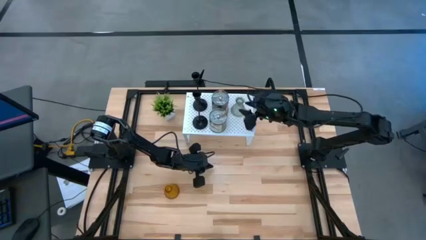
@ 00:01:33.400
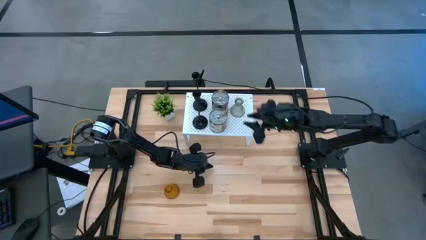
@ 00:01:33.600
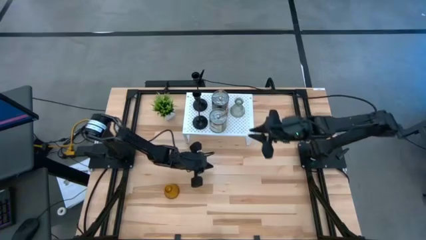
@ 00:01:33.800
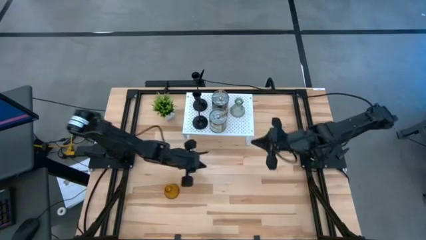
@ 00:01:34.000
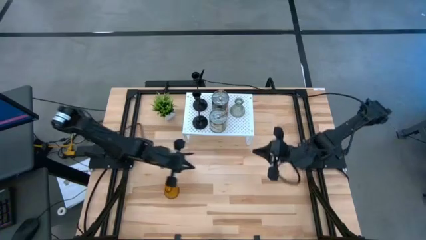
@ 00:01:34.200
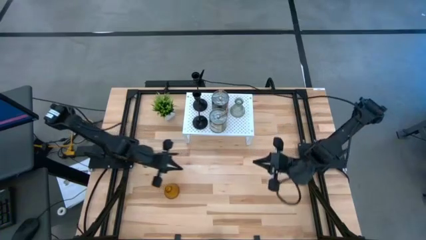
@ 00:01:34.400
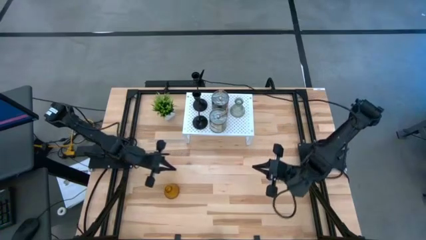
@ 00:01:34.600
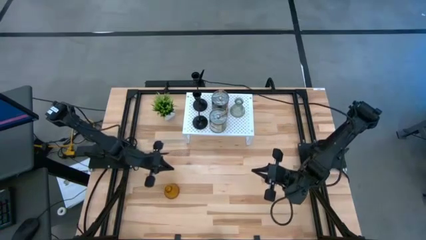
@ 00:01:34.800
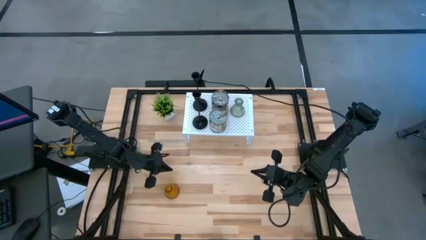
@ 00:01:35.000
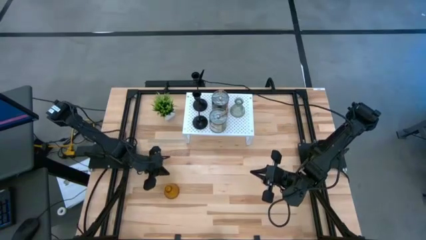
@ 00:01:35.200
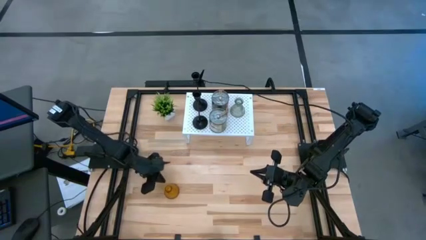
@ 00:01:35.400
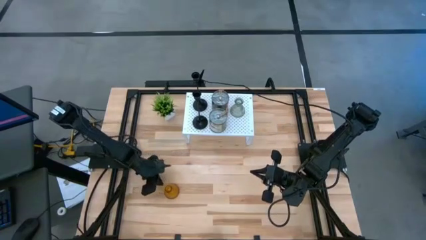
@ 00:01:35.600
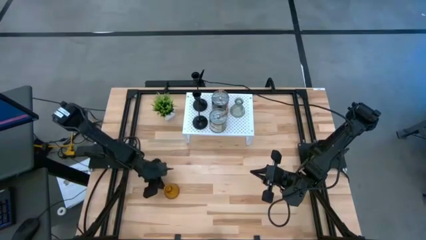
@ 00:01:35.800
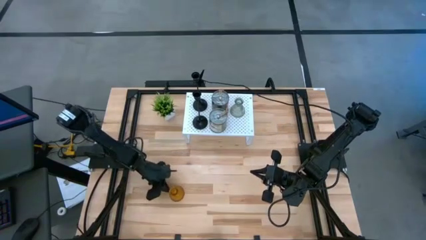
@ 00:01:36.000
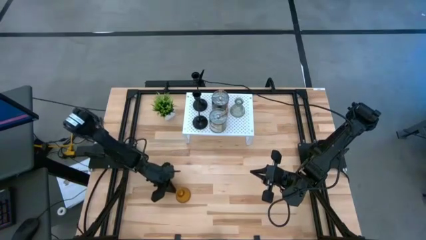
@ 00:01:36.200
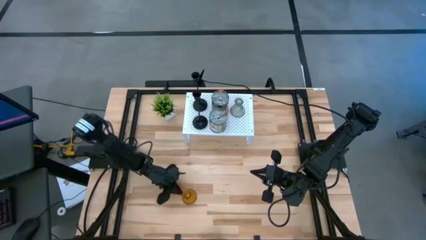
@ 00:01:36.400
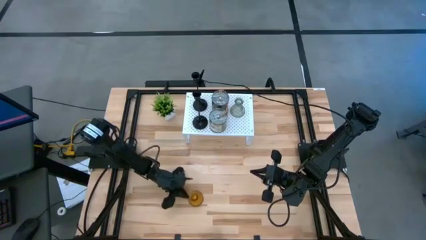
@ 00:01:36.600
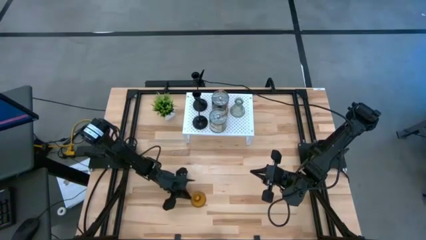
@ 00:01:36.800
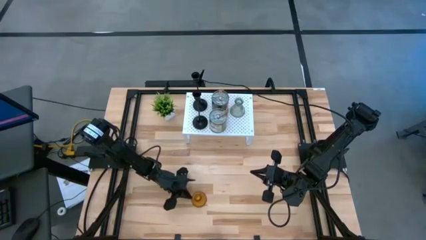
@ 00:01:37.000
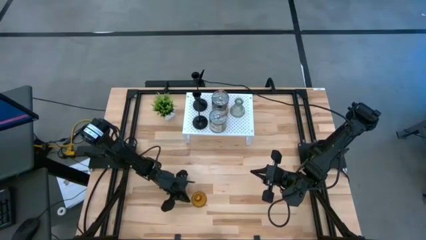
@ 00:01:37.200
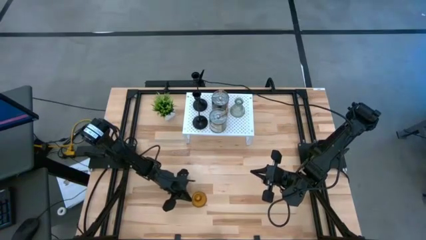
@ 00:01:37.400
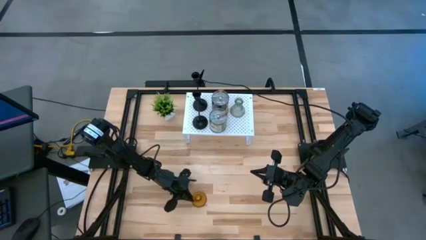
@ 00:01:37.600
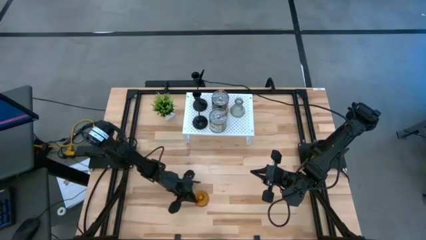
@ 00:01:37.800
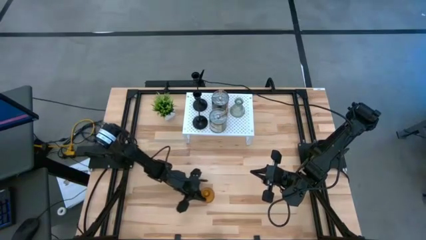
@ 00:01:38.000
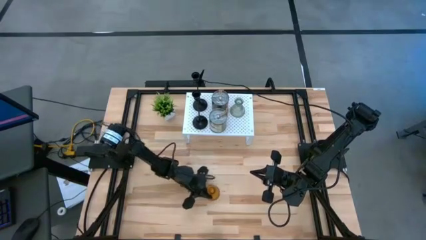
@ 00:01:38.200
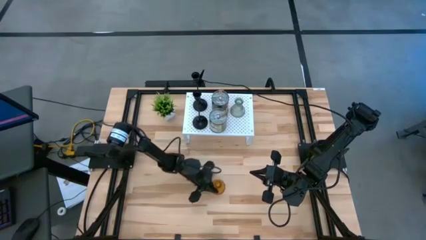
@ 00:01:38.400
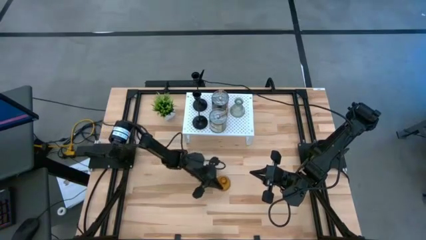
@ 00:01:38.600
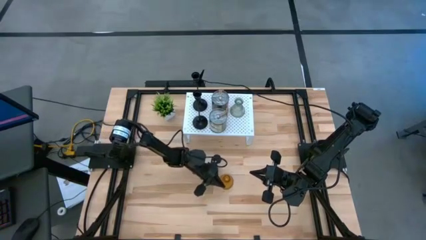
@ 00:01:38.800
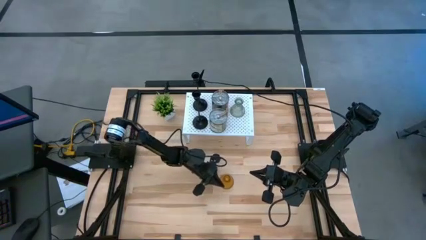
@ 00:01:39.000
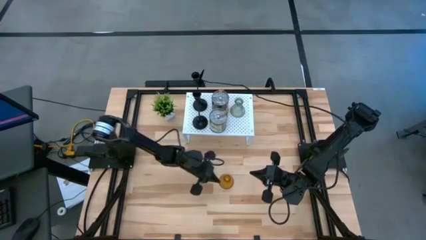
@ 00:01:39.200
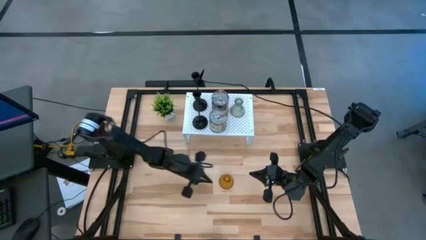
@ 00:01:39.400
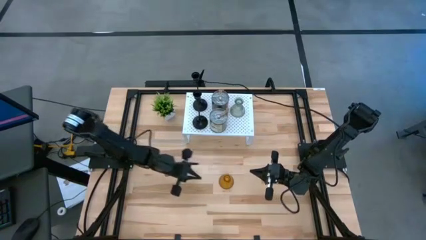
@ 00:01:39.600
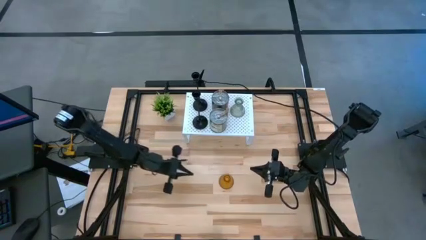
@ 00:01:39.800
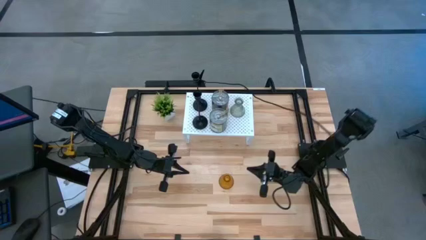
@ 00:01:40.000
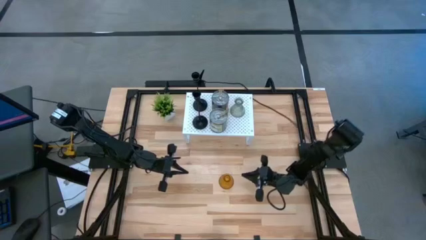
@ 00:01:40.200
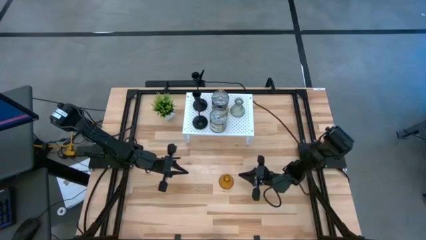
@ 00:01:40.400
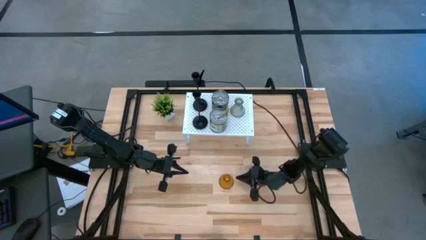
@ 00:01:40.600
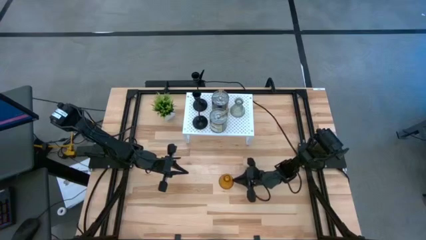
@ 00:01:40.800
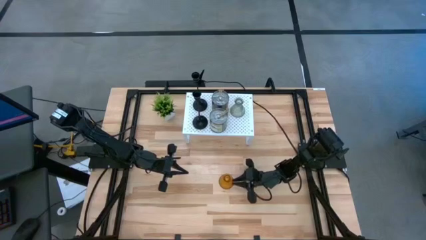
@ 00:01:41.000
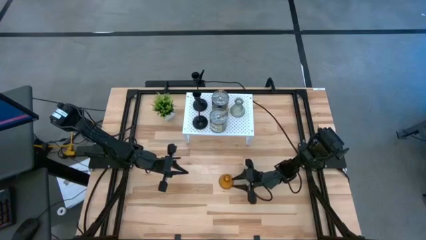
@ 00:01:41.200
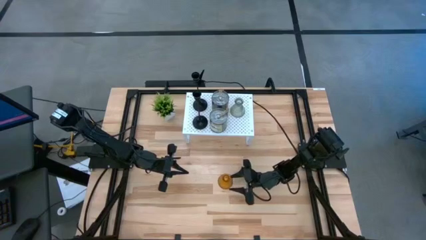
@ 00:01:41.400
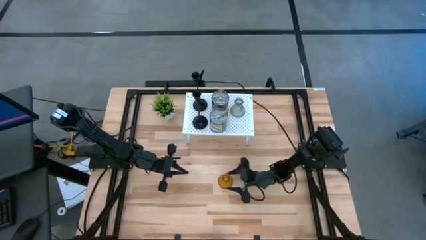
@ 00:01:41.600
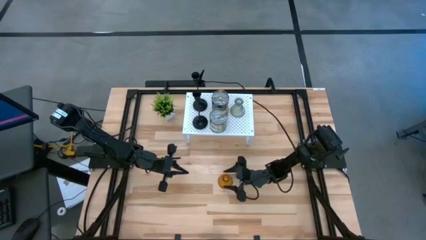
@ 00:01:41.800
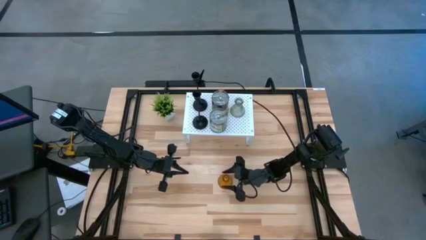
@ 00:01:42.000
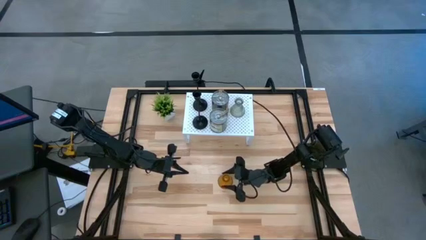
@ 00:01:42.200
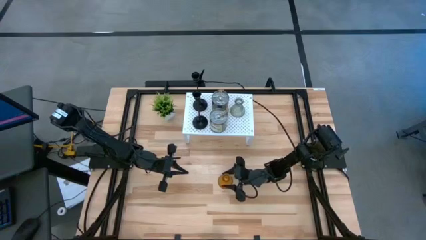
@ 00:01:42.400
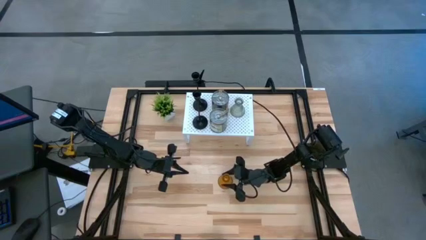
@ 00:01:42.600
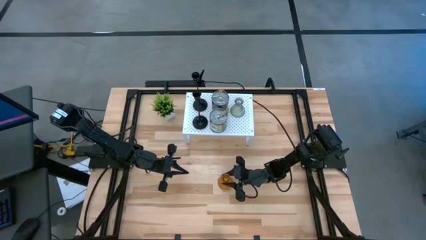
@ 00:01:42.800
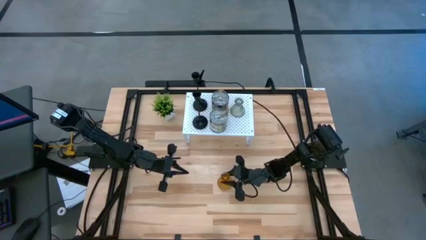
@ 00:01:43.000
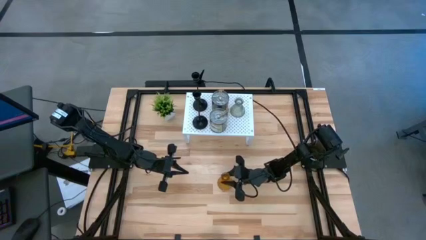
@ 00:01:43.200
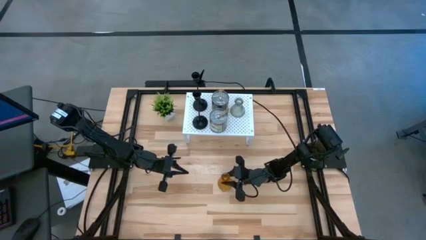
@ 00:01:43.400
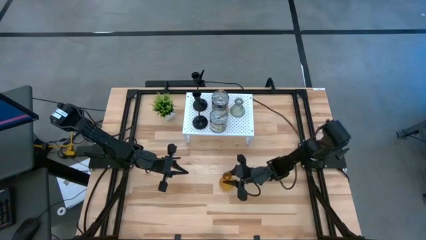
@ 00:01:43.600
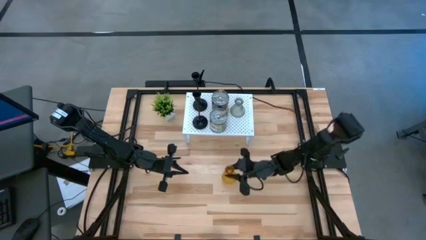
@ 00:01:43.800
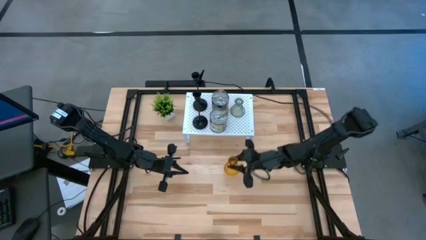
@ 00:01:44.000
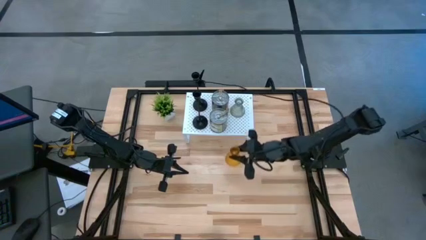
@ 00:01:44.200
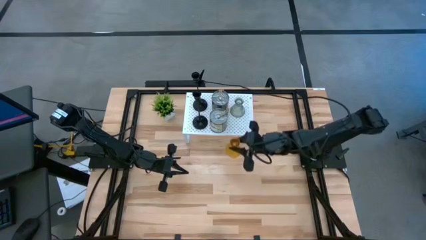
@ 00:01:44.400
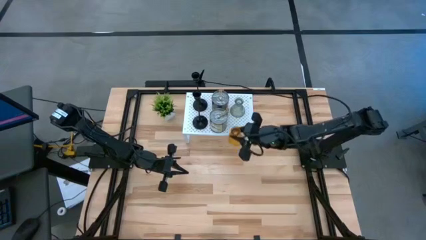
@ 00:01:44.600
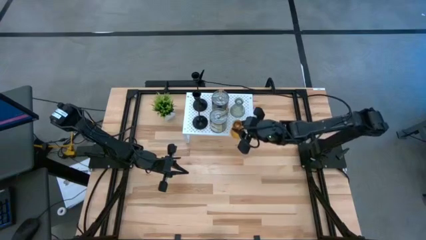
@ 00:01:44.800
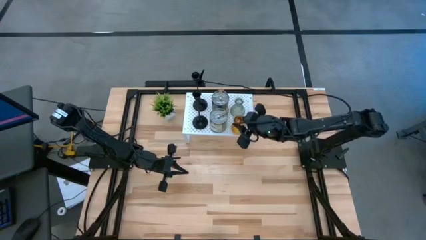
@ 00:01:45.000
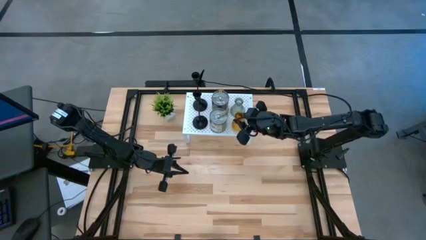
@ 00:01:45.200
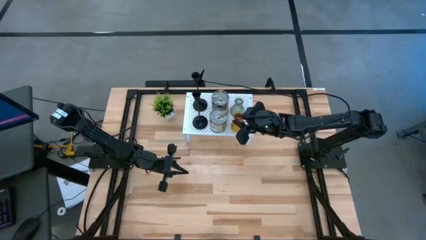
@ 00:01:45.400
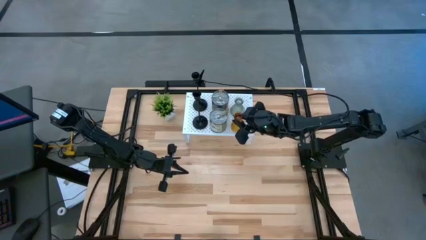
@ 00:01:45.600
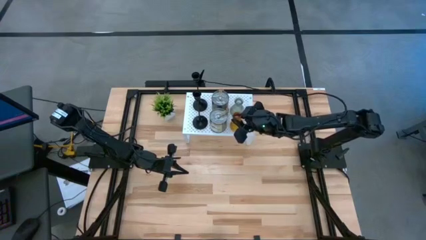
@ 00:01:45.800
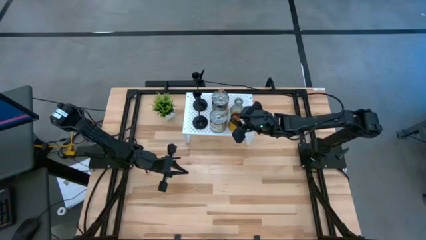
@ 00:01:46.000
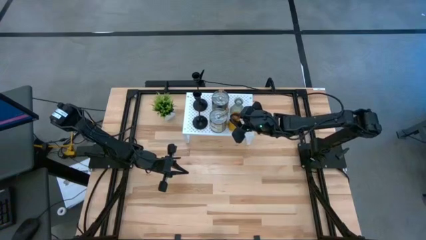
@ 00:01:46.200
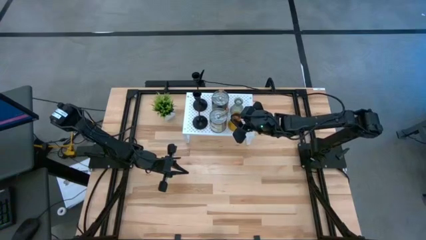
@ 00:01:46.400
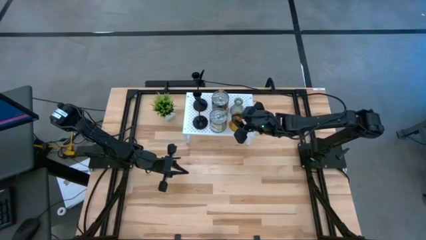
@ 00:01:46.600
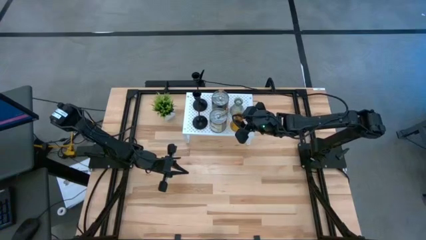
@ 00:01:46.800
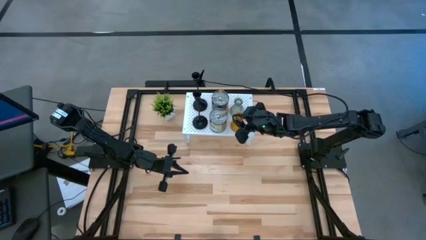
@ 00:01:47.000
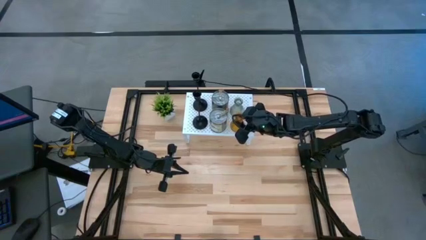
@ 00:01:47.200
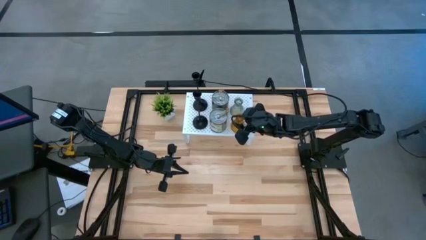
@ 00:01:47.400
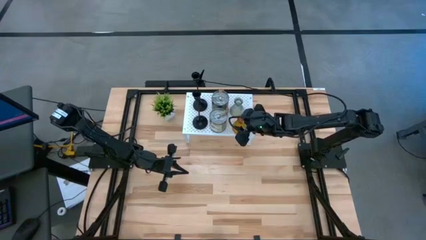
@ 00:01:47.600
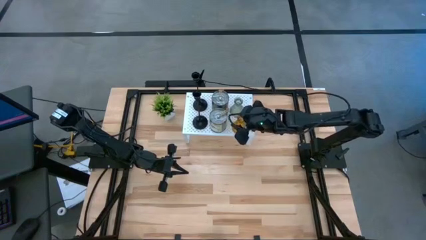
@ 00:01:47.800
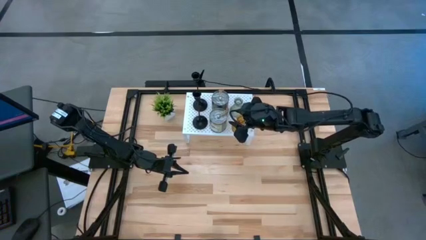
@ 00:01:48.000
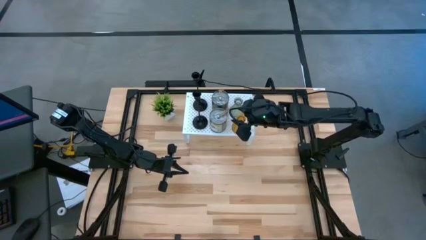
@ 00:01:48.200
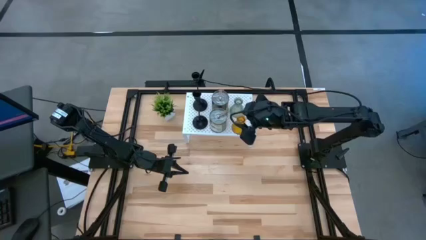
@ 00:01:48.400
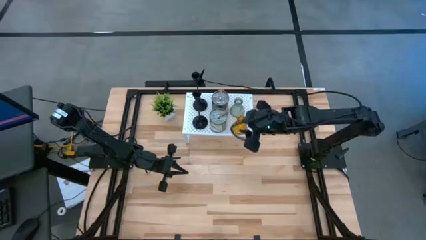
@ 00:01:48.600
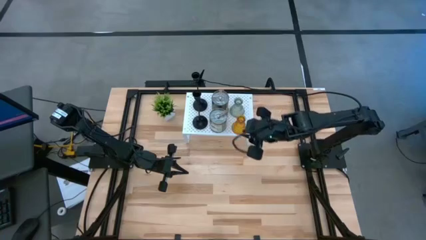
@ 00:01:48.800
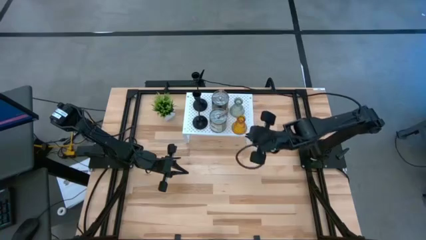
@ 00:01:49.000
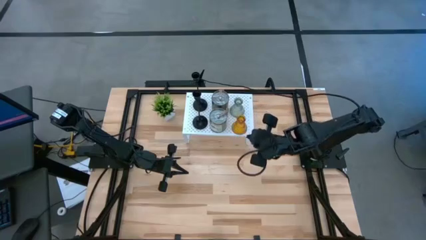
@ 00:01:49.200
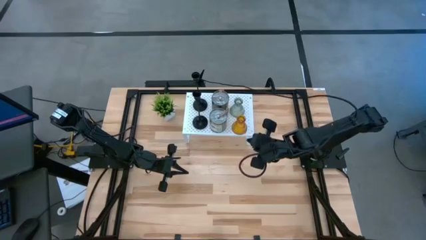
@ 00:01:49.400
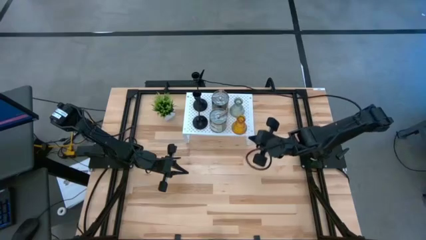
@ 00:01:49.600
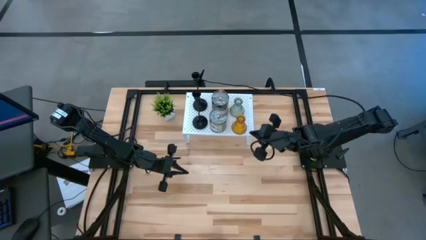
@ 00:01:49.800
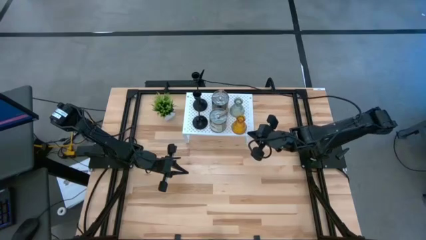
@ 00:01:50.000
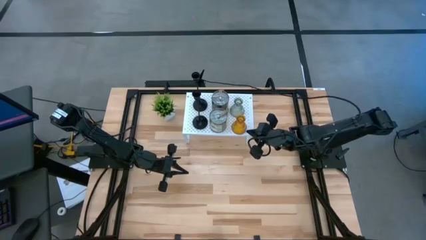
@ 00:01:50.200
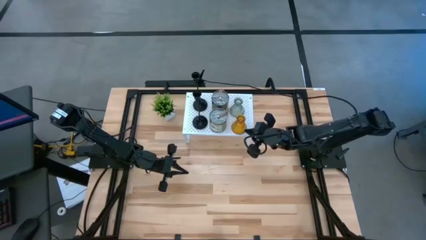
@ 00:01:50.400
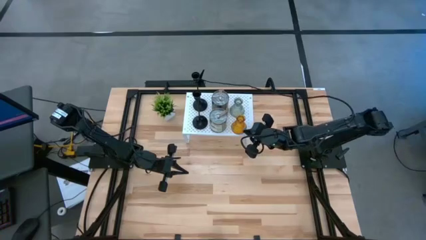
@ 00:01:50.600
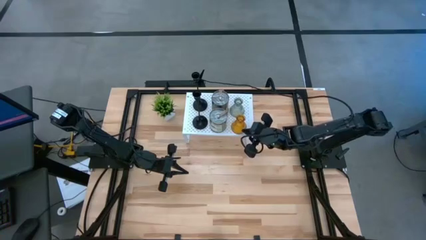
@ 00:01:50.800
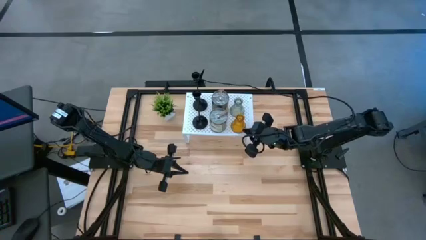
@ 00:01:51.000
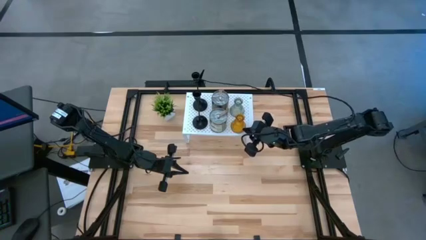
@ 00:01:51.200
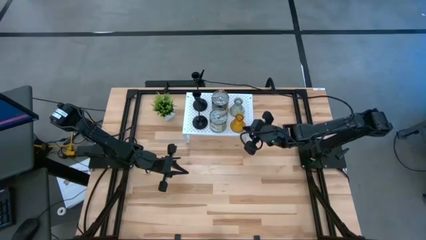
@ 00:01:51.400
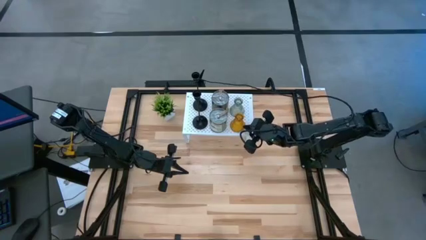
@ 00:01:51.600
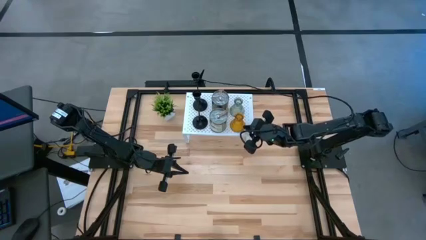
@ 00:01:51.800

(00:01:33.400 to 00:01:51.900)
Task: Pick & Place candle stick holders
Align the orange glass candle holder with the other green glass candle holder on the shelf
